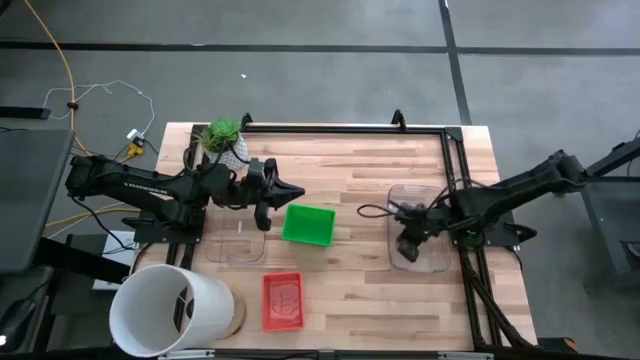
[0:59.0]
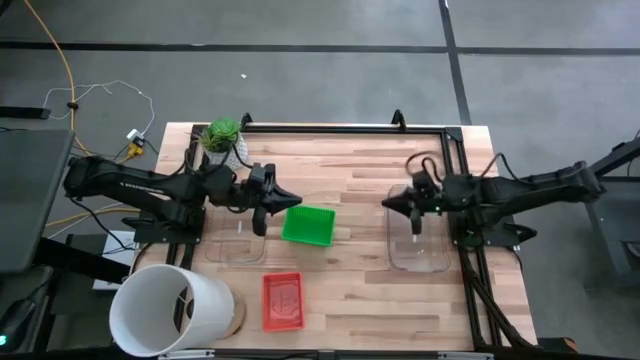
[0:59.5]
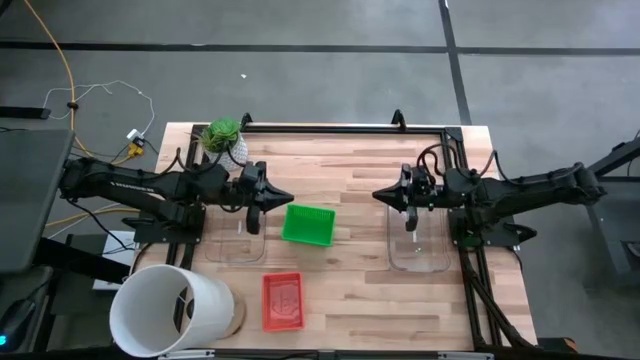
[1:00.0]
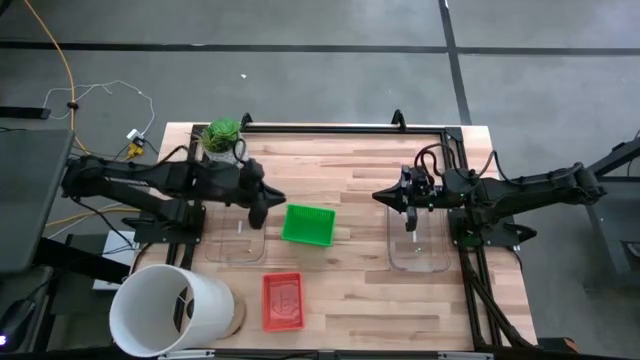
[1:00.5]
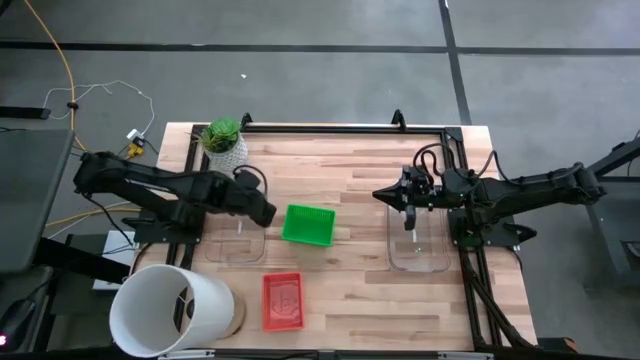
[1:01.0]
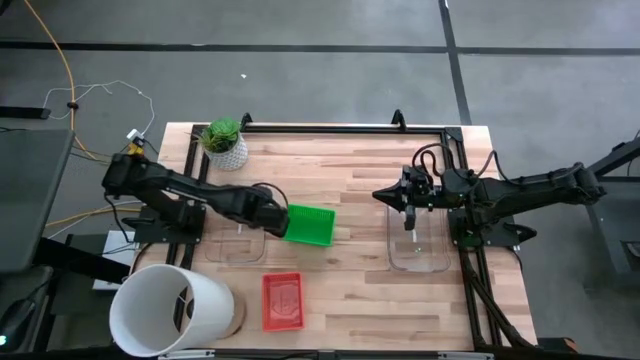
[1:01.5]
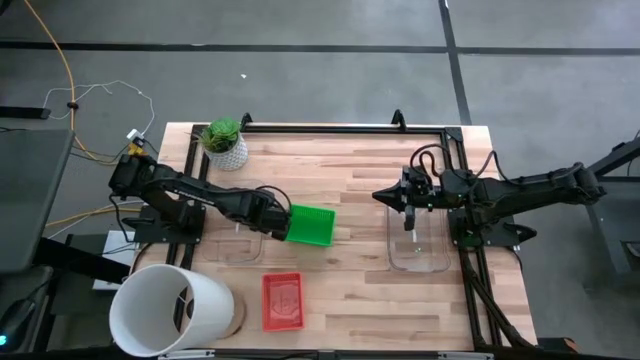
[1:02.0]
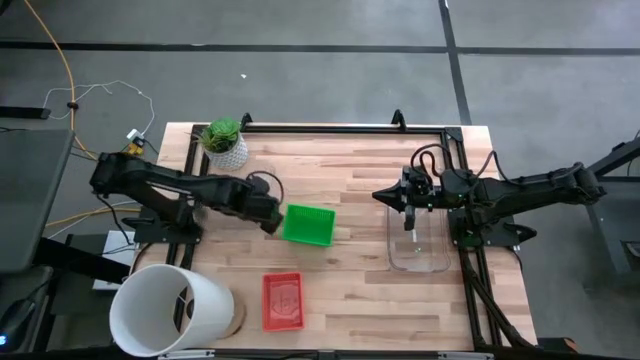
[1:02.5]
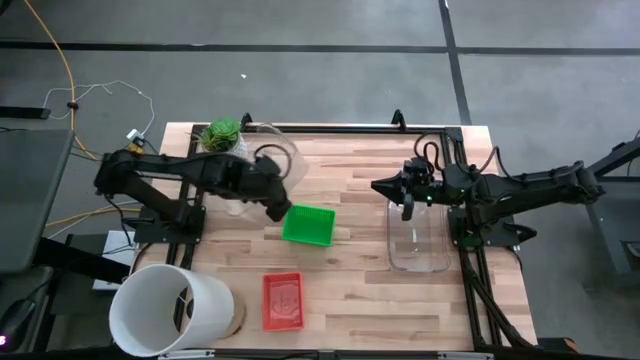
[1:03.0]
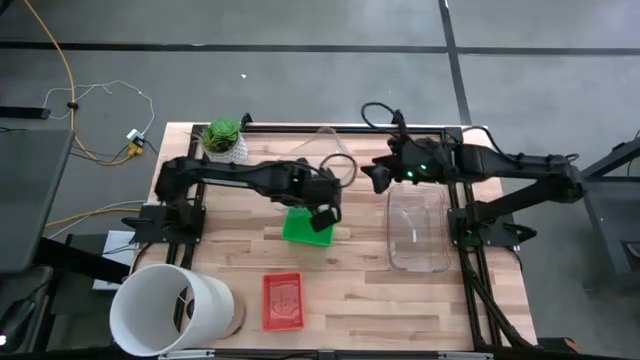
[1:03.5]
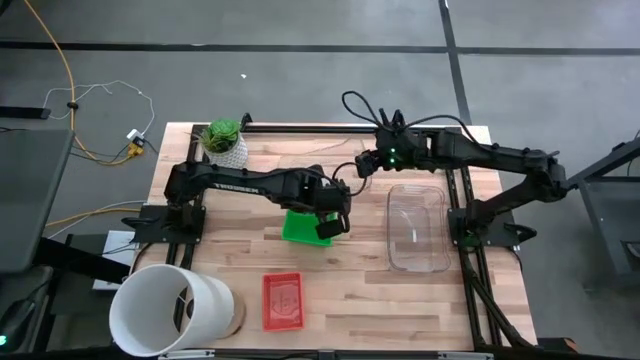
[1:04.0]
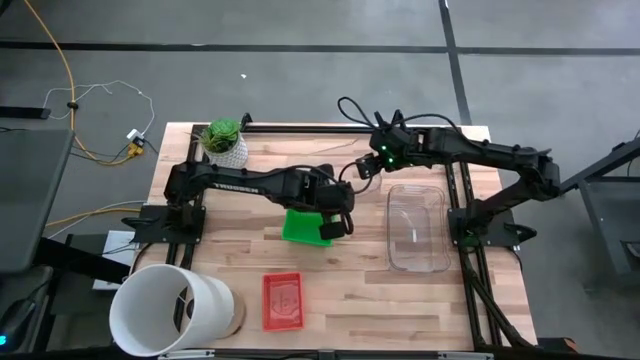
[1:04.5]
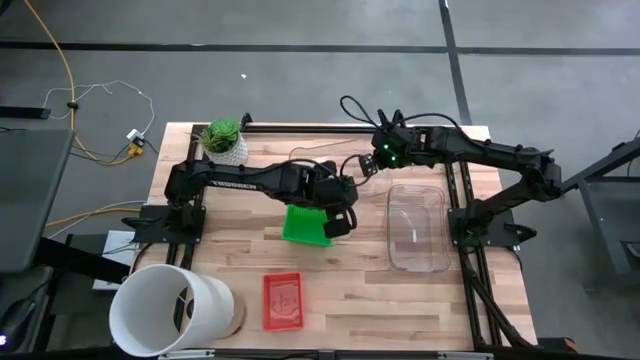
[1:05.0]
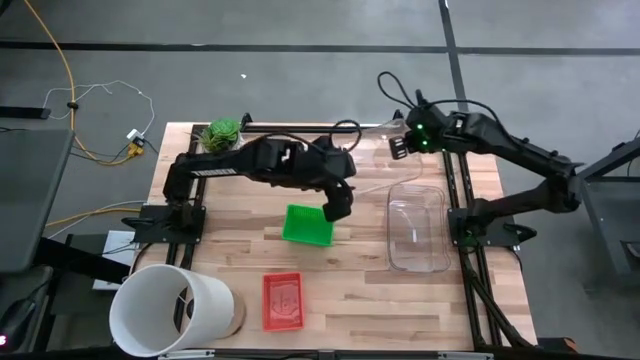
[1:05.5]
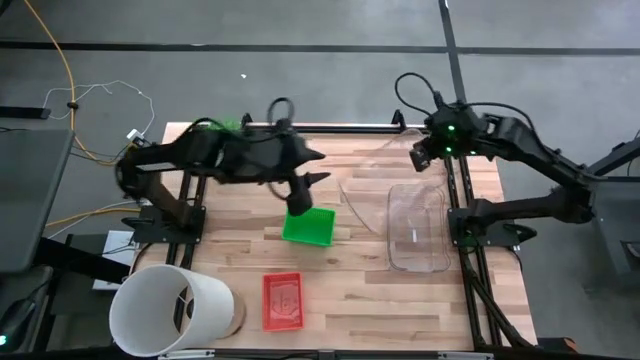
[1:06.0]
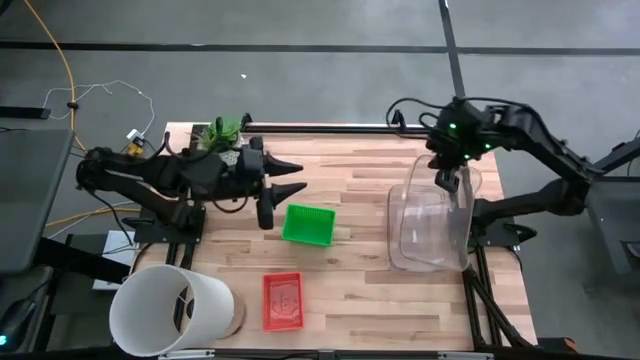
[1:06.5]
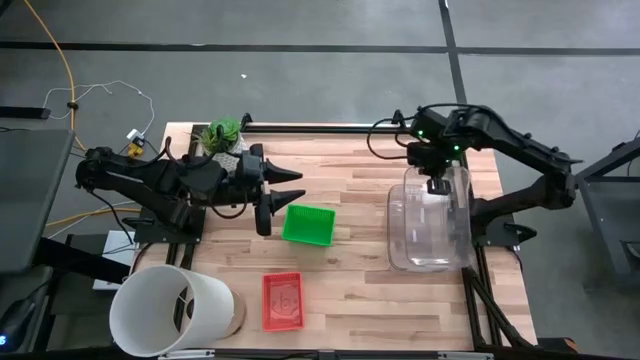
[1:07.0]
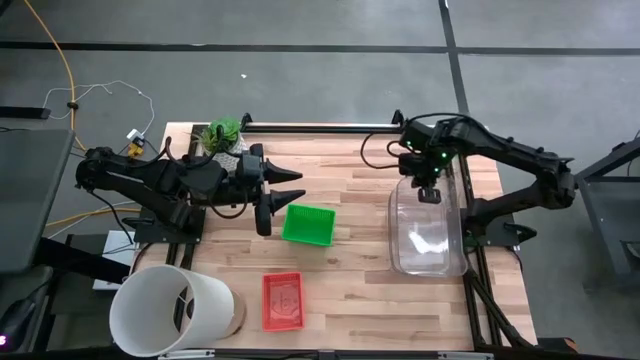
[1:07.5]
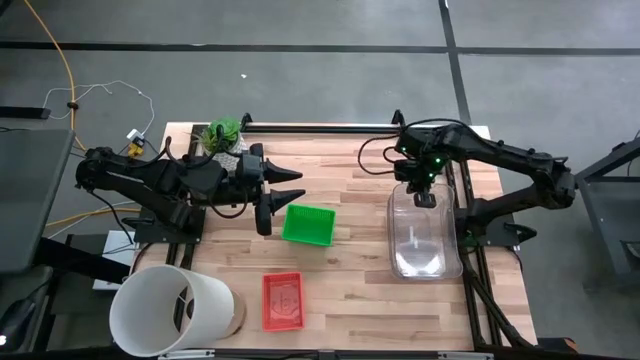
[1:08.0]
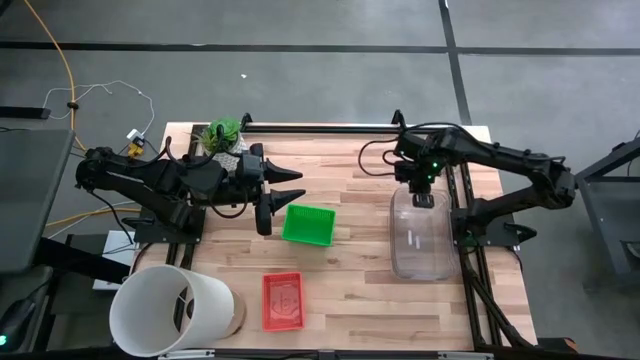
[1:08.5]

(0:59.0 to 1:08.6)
Stack the left transparent bin on the right transparent bin

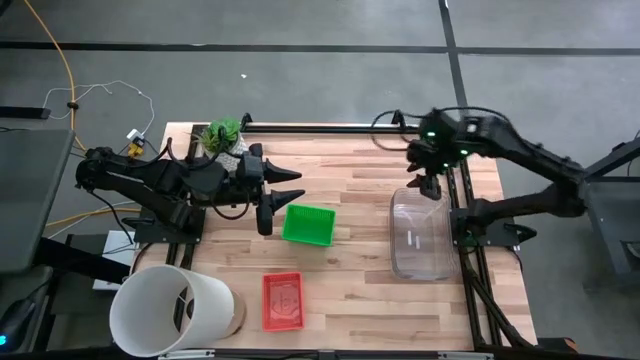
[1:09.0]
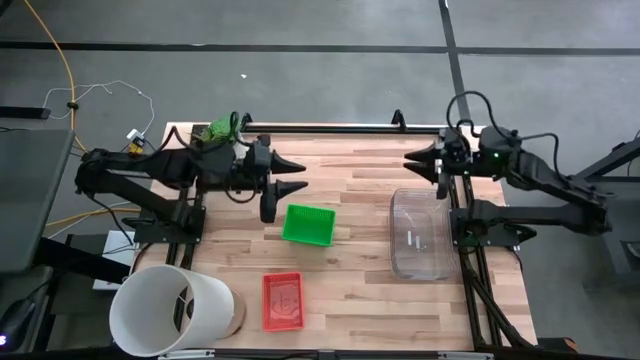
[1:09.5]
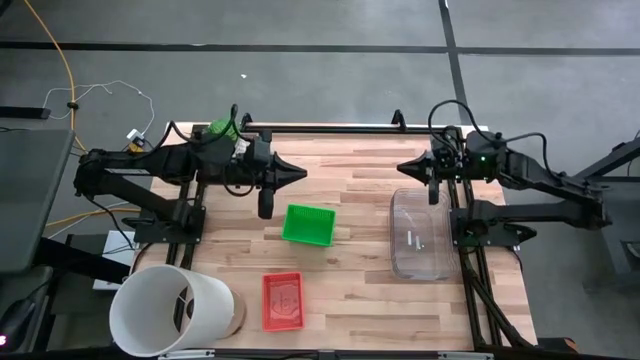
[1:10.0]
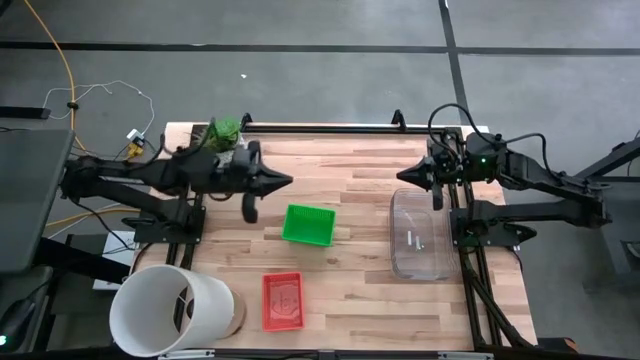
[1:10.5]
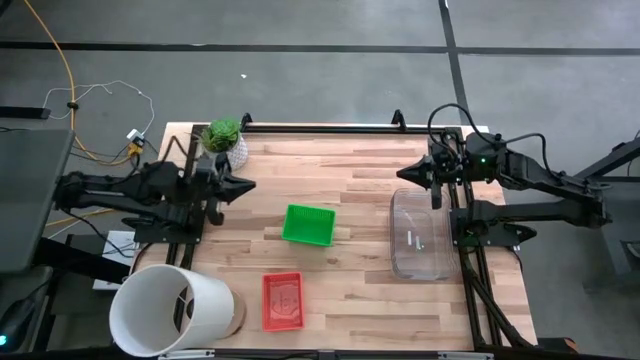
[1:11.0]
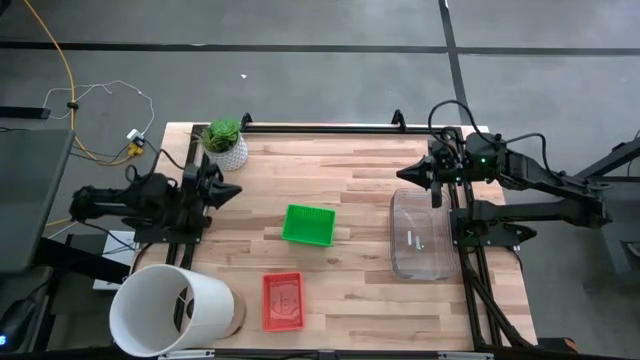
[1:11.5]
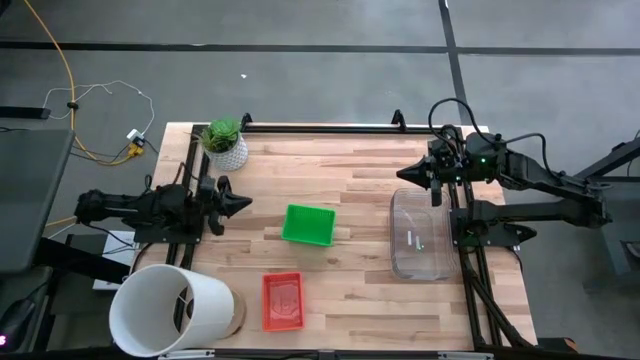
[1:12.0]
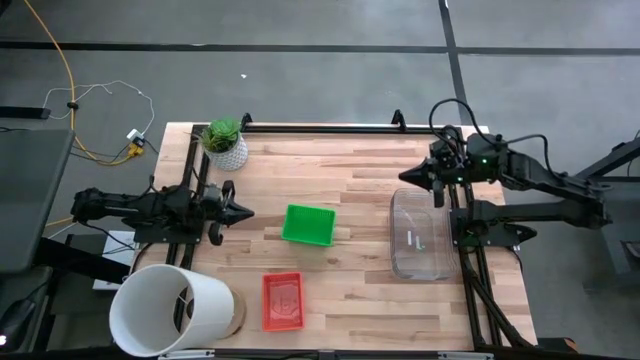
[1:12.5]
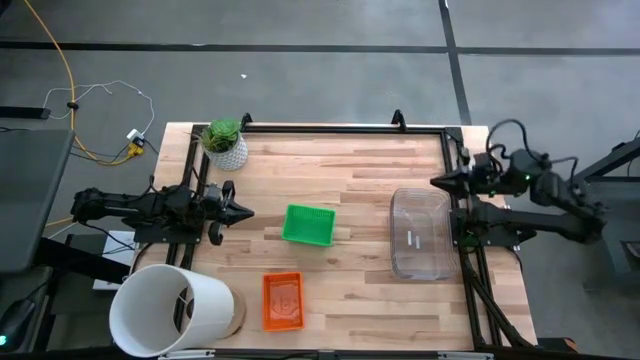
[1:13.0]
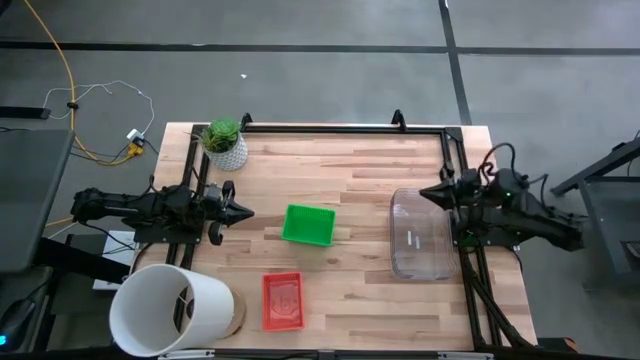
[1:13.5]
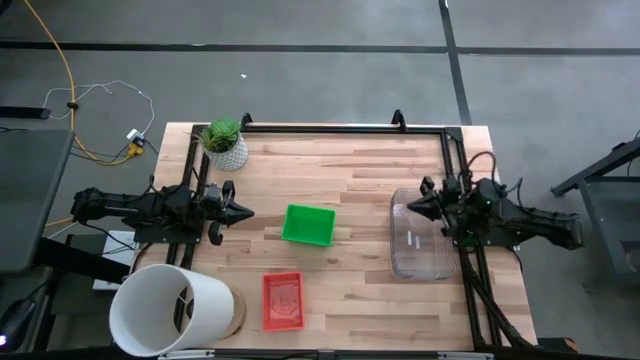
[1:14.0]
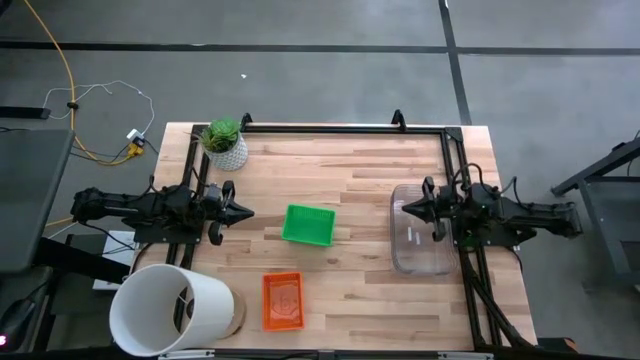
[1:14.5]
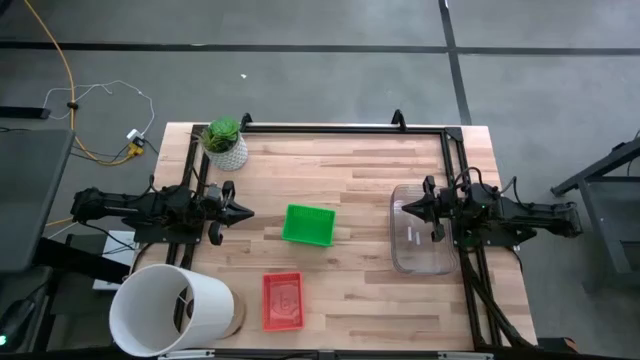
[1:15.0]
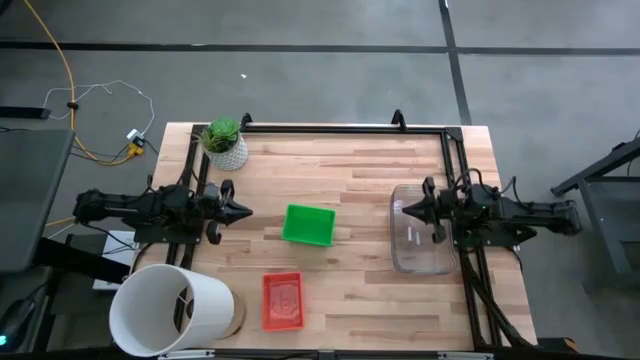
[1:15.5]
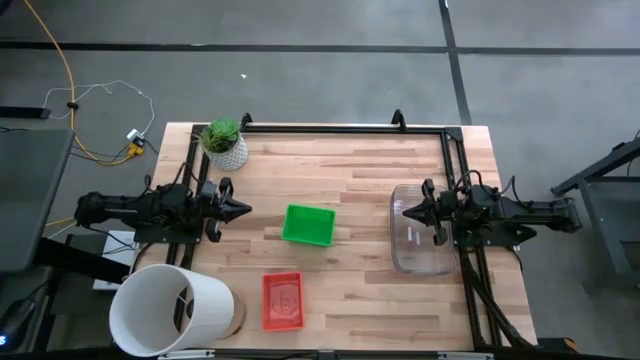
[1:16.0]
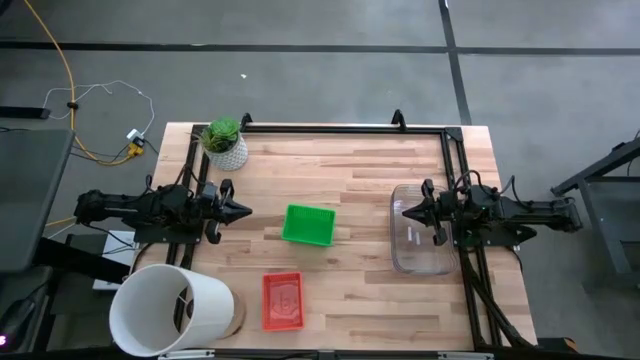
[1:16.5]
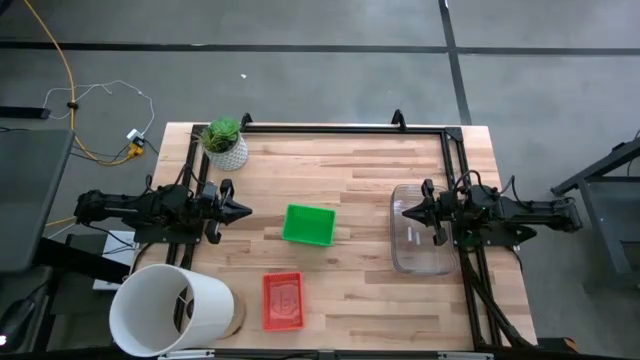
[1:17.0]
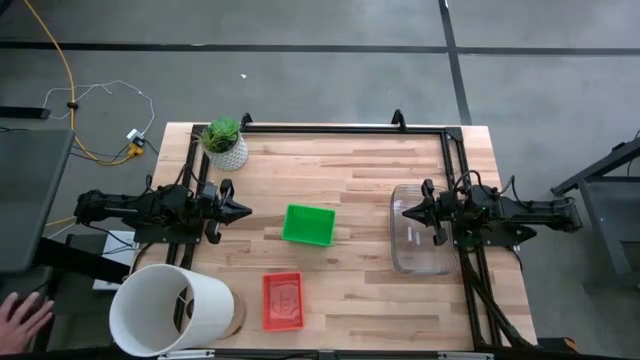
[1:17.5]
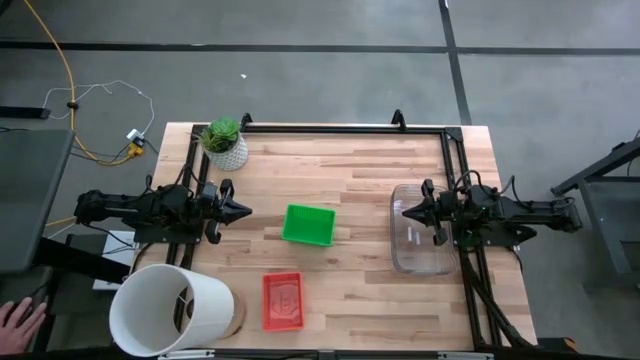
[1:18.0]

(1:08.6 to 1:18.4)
Return to Home Position
